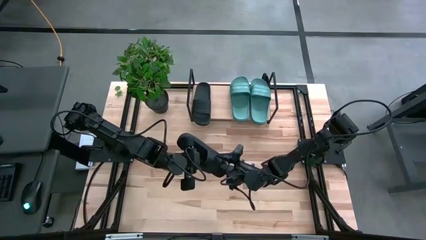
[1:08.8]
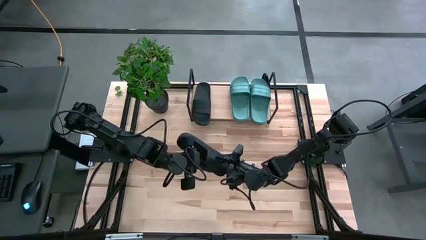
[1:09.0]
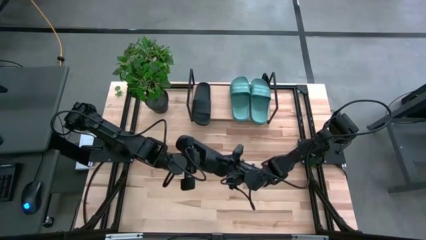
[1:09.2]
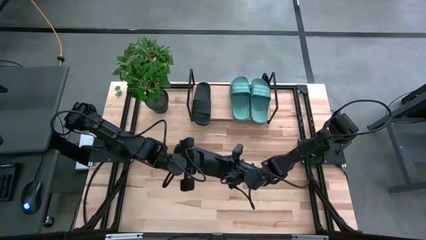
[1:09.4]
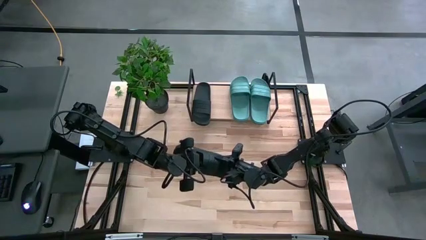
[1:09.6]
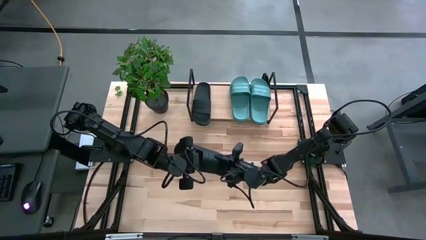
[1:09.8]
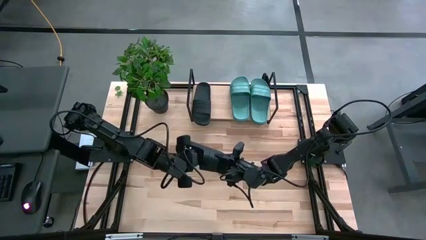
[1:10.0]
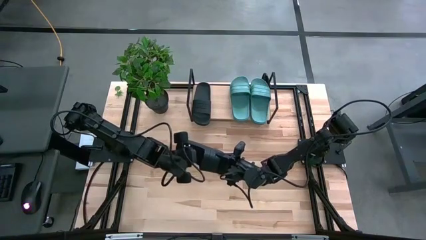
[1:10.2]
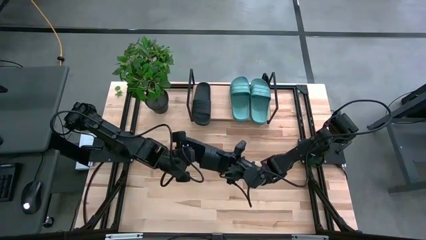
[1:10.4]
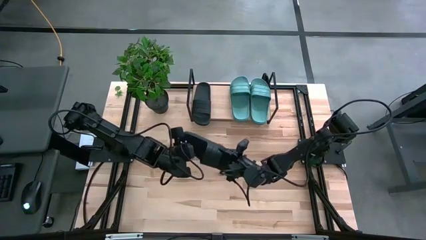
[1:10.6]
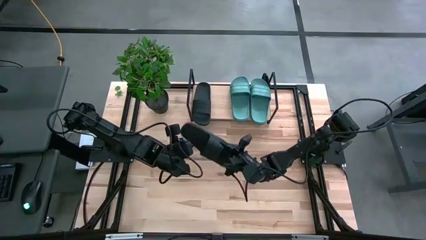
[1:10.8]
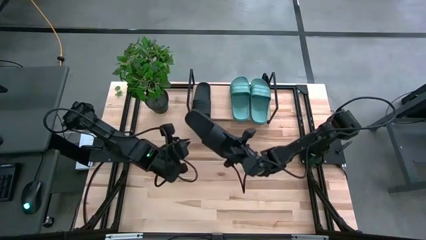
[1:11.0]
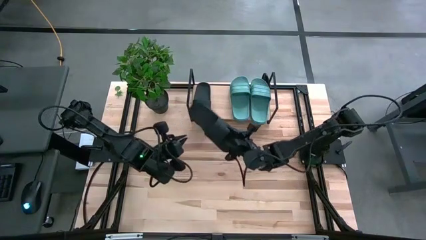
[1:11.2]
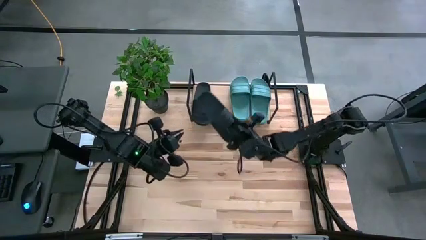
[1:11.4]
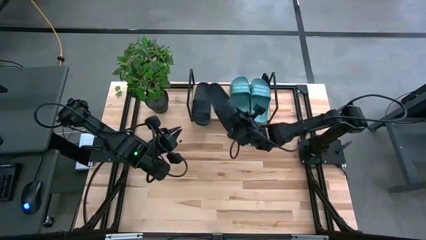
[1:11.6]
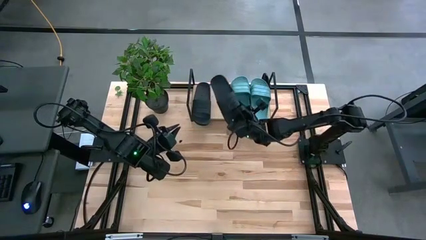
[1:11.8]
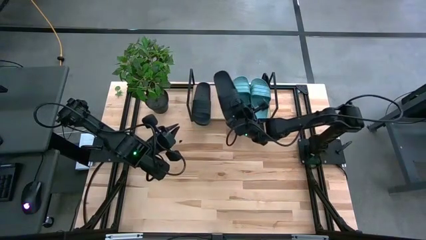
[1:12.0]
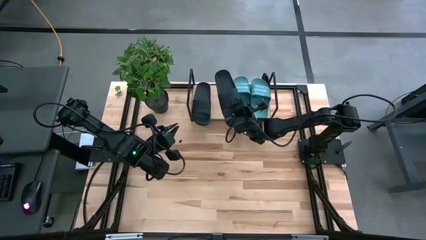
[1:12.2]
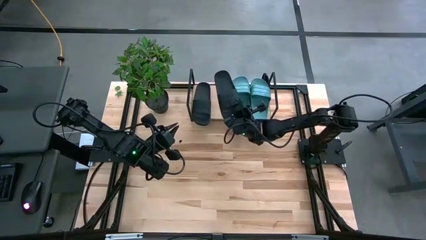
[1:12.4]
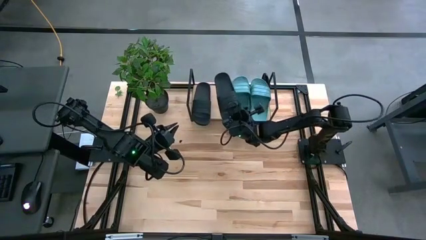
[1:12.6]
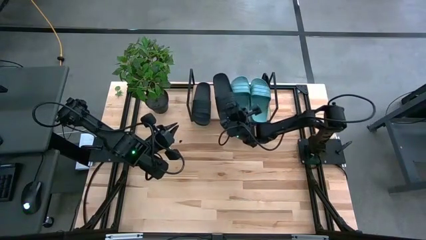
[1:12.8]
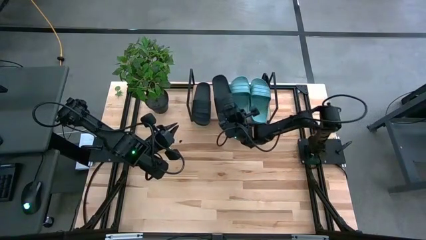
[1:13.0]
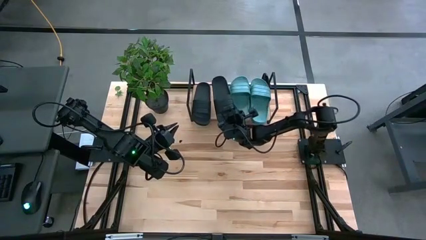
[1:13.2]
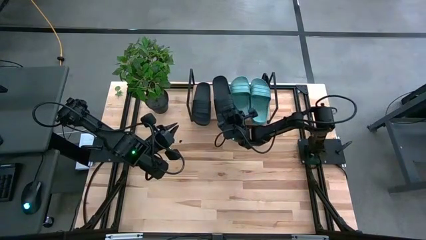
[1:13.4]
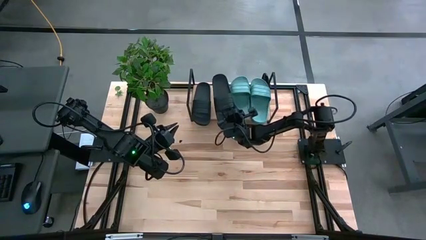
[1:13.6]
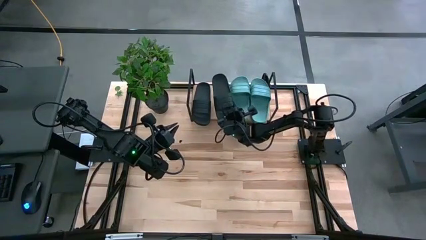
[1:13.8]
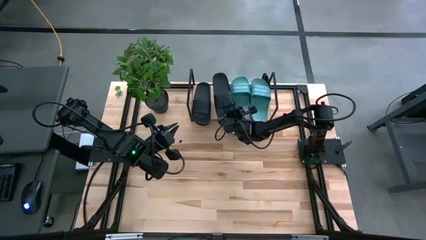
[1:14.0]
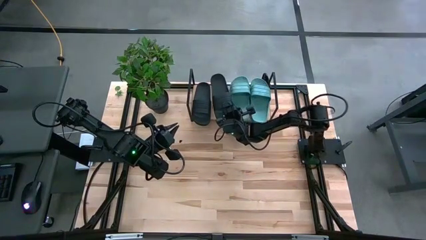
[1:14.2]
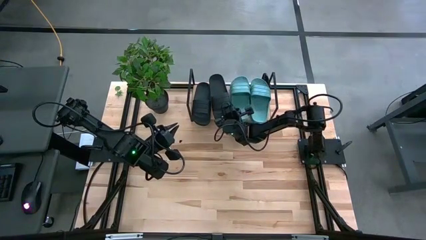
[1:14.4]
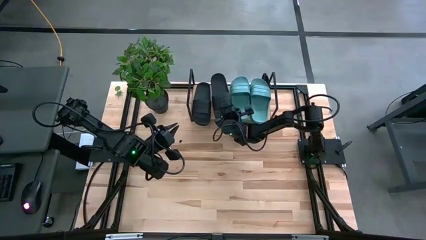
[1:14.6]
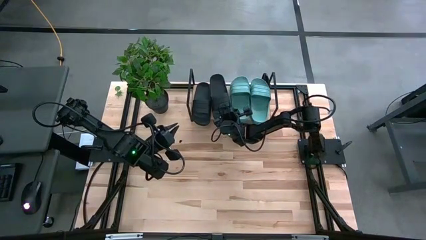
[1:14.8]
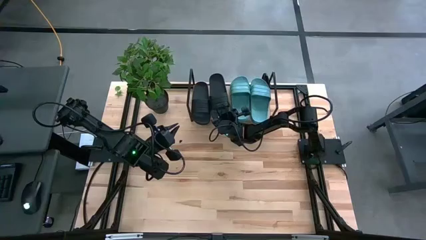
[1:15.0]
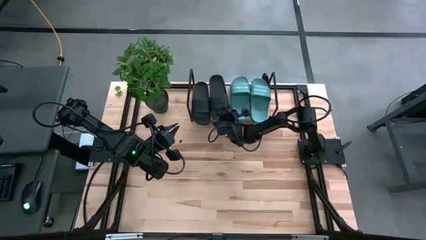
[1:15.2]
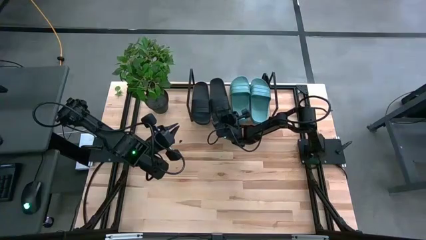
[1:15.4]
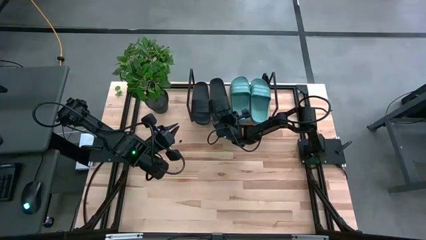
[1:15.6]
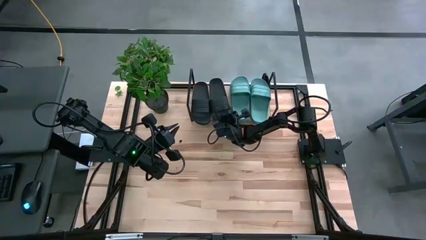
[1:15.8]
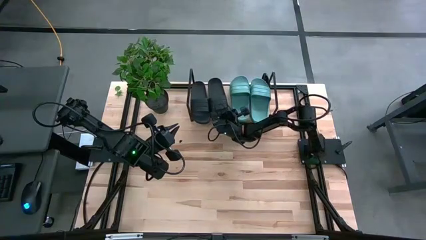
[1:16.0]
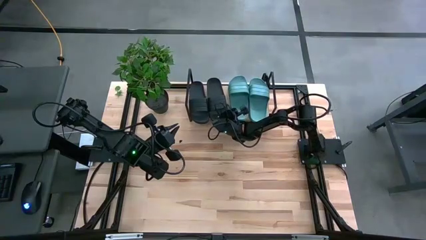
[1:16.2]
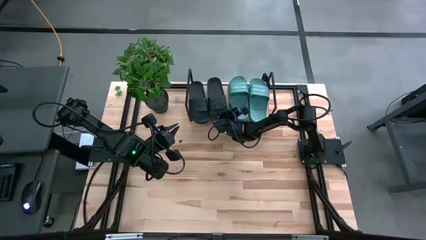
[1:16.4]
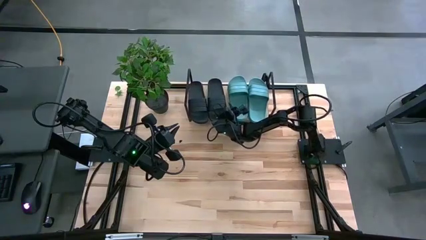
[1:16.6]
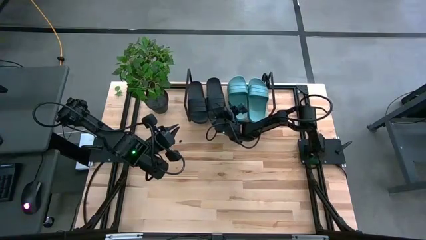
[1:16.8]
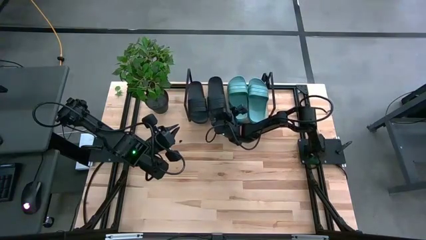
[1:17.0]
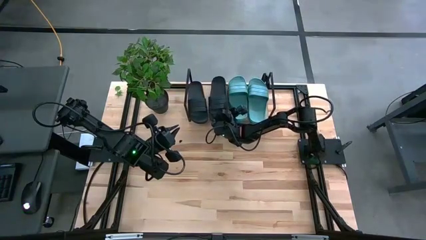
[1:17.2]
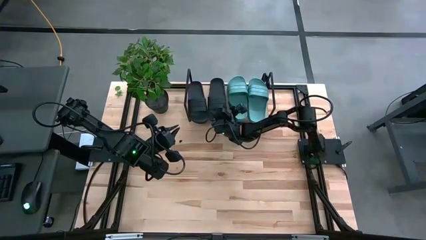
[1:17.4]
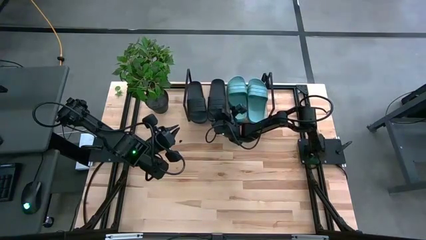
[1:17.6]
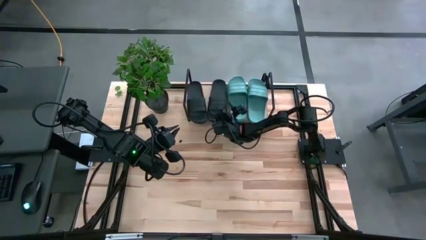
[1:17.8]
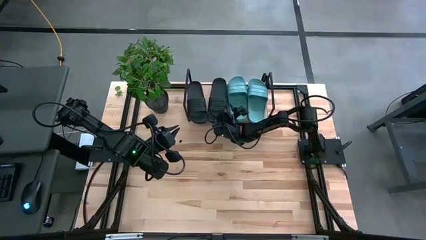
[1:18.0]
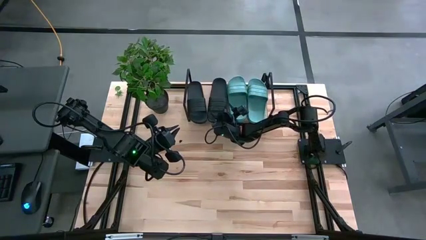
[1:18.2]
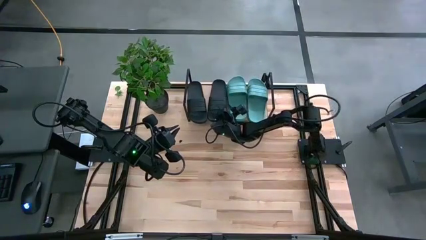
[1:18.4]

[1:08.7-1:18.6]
Task: Pick and place slides into the shelf
Put the black slipper on the shelf

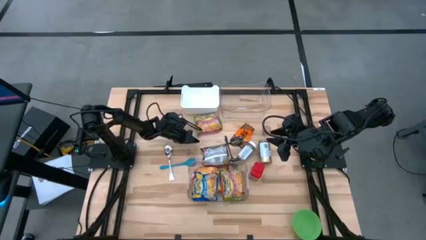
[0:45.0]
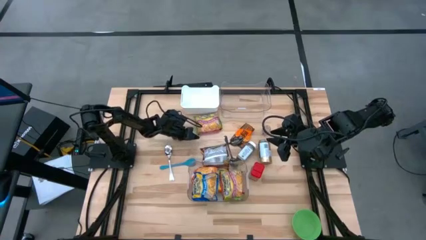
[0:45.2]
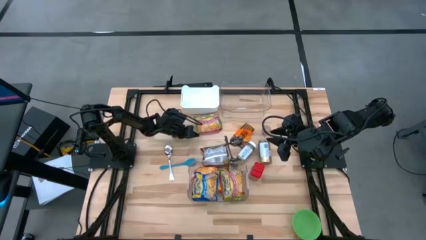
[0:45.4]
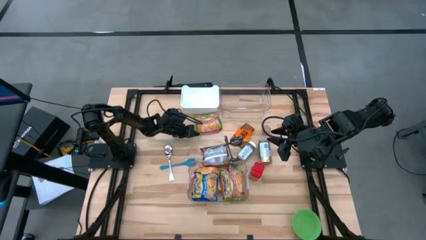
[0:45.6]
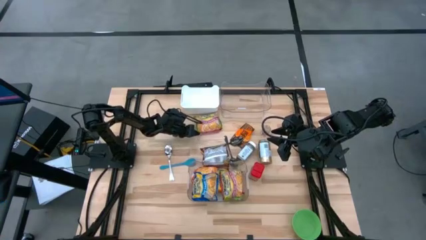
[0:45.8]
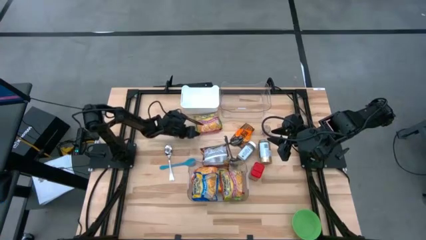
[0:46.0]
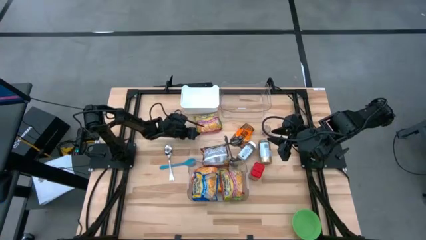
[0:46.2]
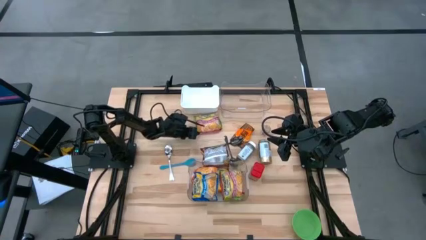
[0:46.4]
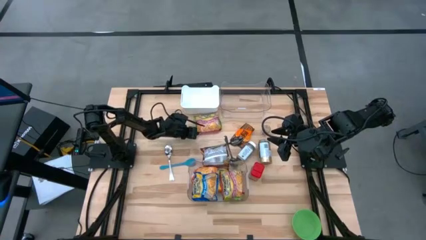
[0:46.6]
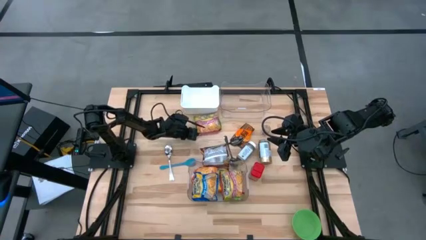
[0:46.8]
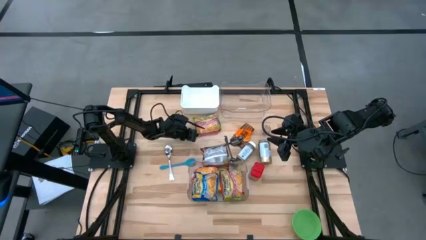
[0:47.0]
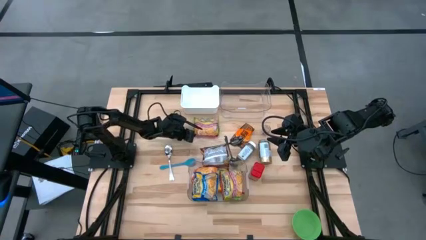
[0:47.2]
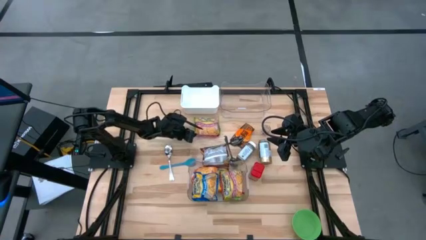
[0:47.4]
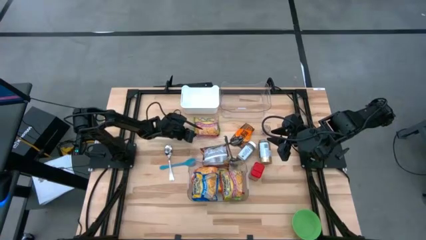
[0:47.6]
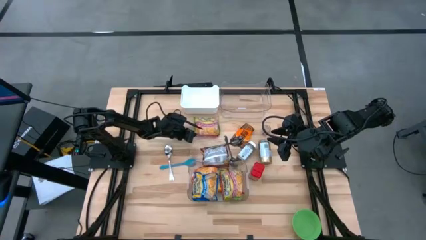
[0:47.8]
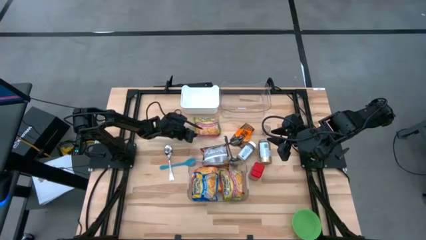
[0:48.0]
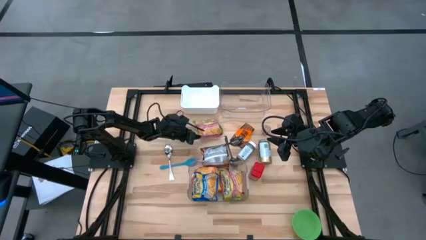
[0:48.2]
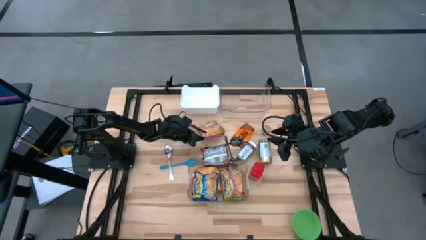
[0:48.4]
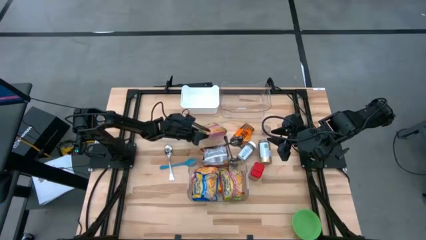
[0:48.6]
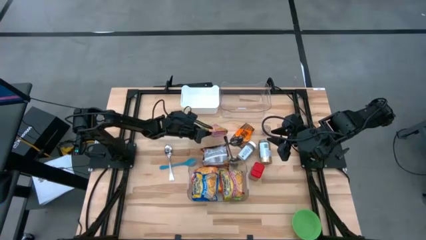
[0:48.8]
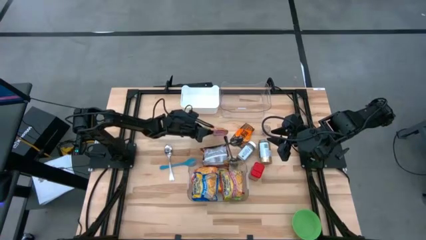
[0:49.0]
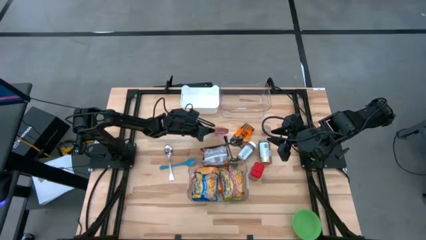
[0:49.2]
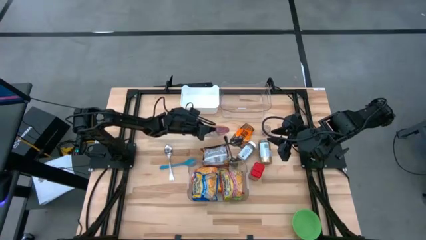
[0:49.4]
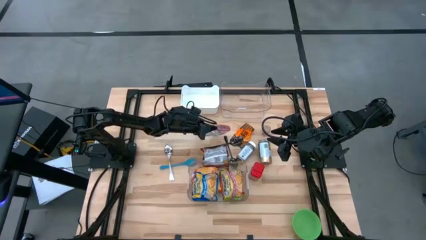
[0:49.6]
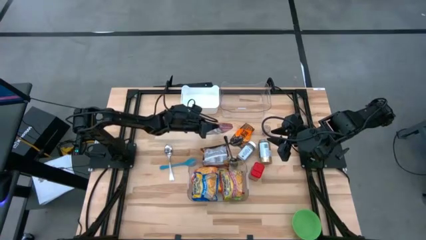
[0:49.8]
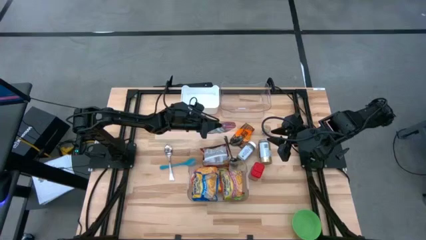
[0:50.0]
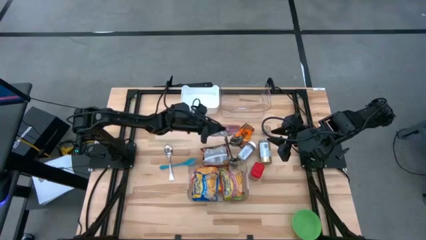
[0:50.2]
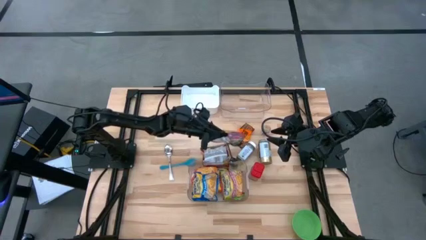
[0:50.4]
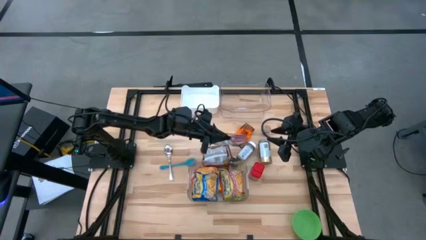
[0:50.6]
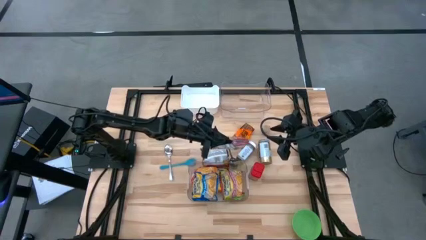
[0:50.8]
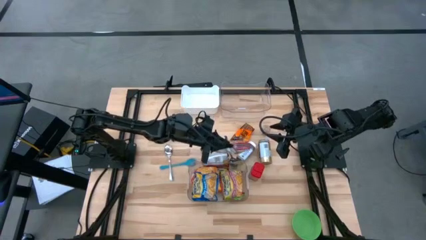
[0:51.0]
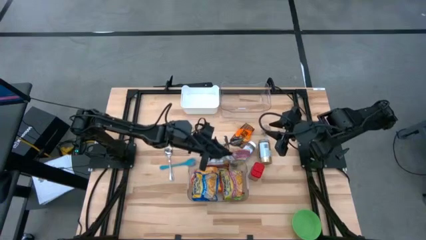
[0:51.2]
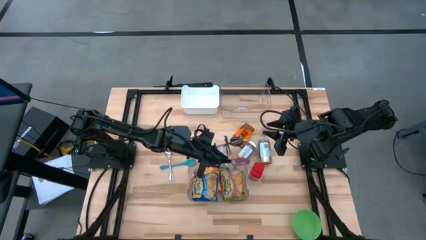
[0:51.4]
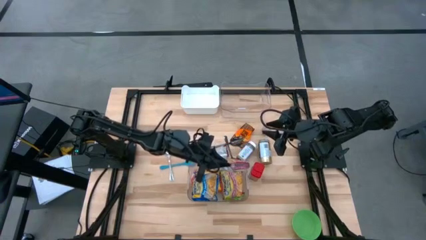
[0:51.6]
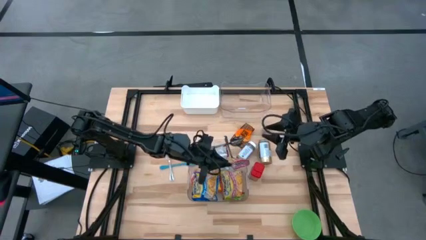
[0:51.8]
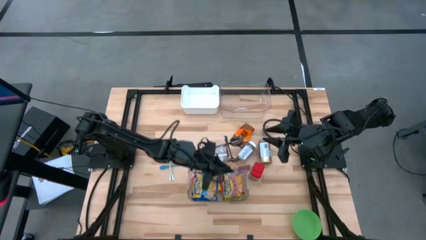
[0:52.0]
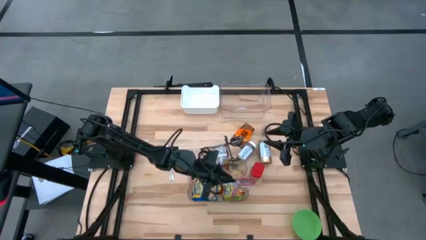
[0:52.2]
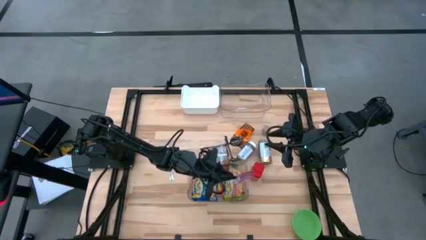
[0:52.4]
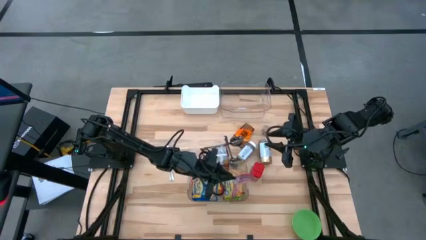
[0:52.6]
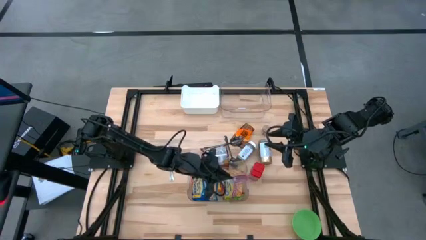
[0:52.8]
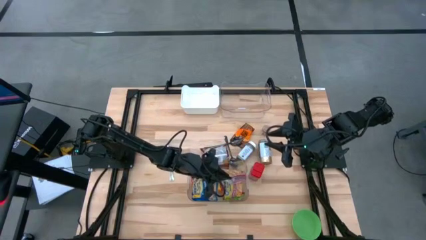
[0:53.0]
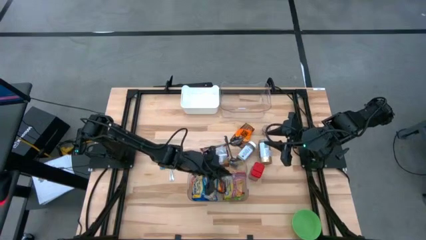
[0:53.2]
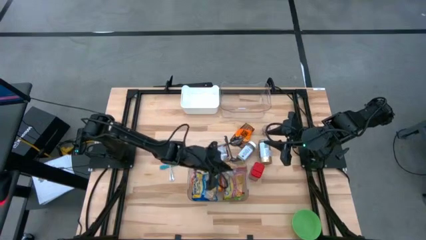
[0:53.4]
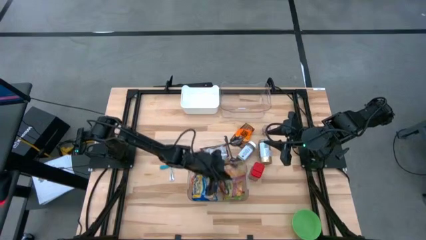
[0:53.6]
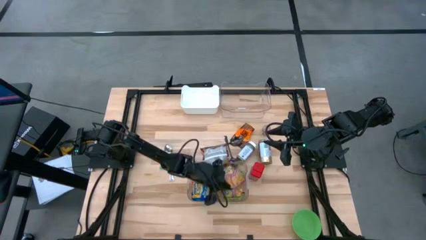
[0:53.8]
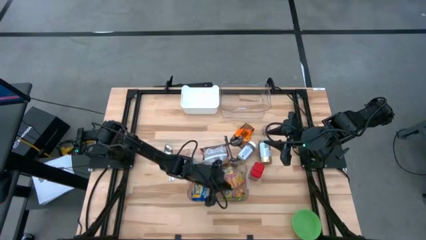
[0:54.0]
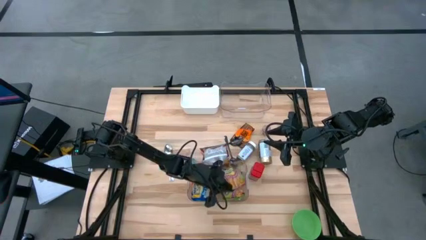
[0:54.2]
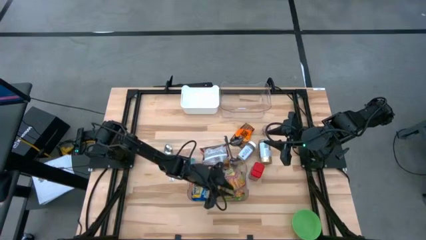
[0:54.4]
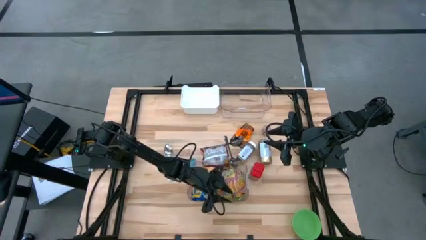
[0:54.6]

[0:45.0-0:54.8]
Task: Pick & Place Food Item
Put the green noodle pack into the bottom transparent bin
